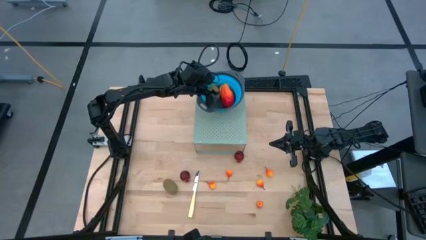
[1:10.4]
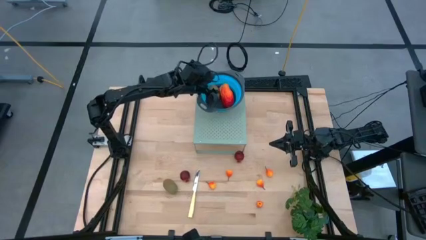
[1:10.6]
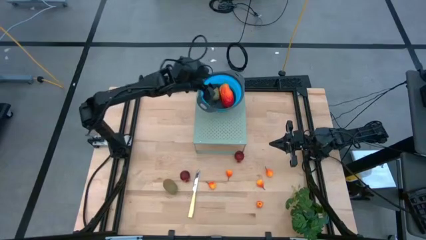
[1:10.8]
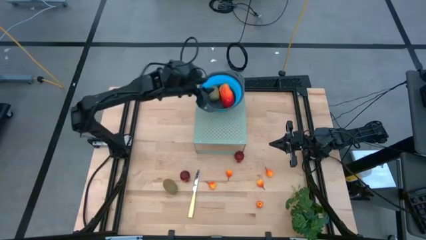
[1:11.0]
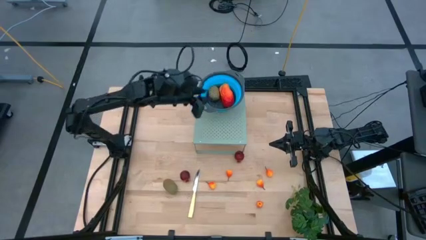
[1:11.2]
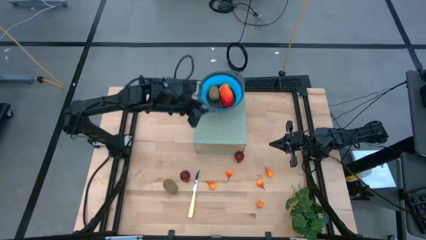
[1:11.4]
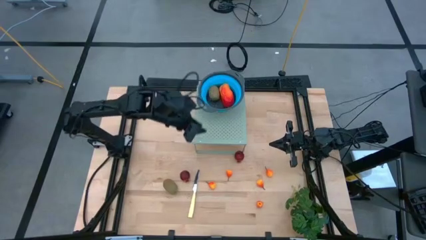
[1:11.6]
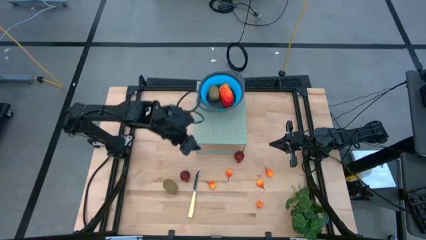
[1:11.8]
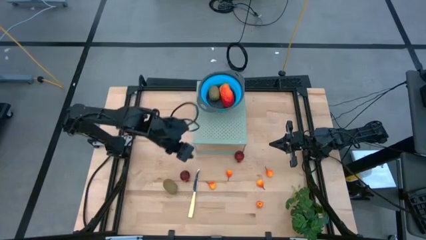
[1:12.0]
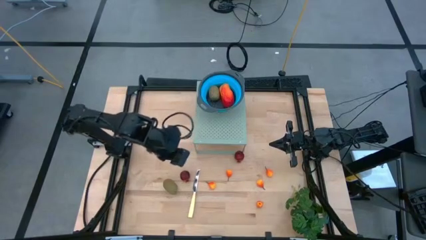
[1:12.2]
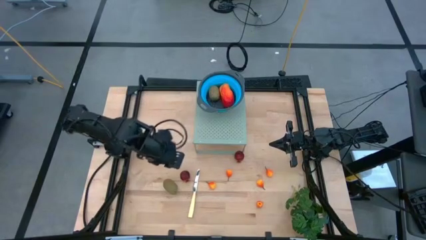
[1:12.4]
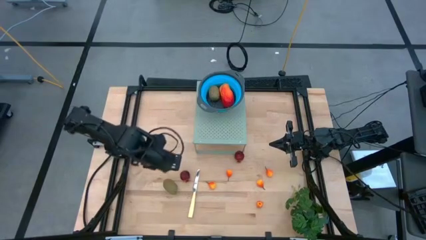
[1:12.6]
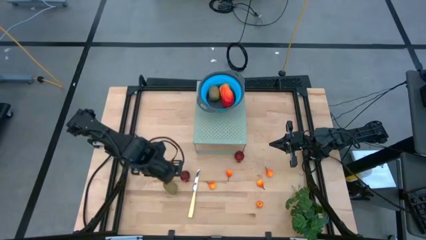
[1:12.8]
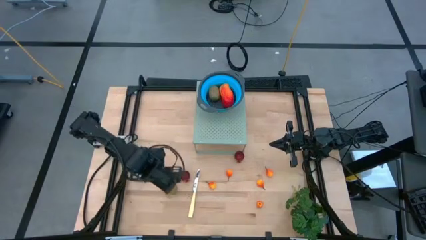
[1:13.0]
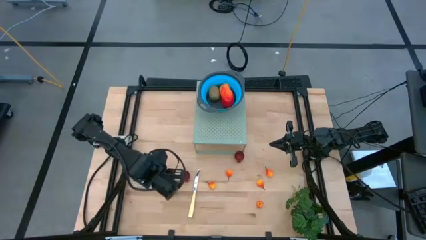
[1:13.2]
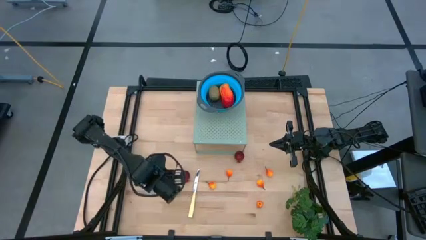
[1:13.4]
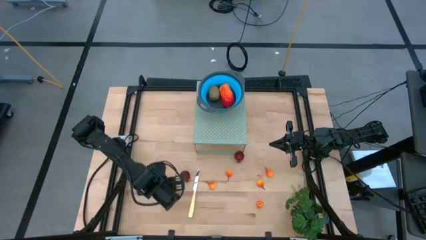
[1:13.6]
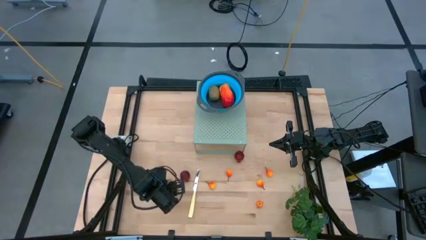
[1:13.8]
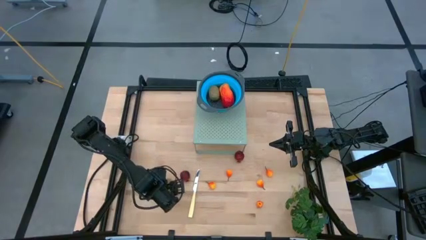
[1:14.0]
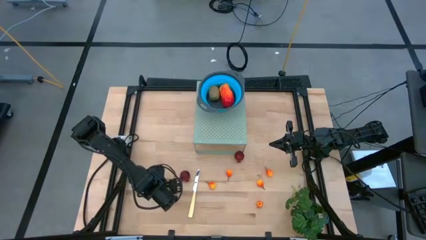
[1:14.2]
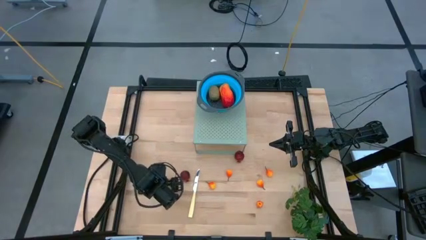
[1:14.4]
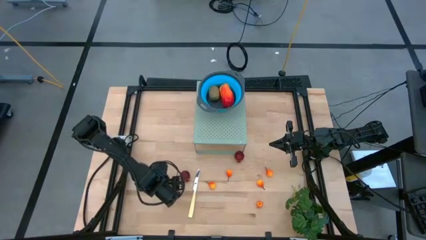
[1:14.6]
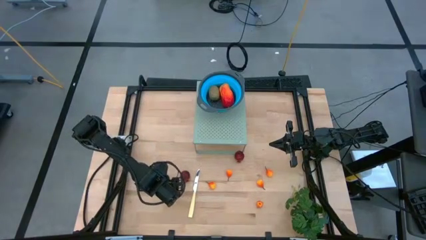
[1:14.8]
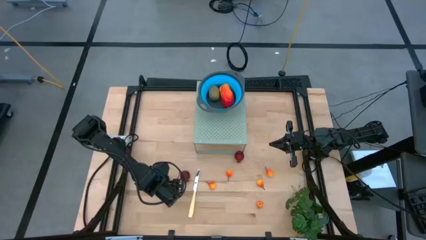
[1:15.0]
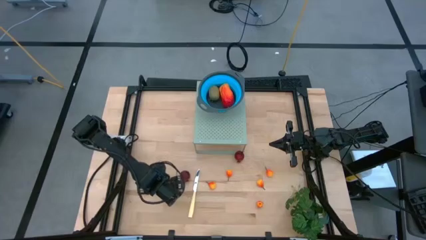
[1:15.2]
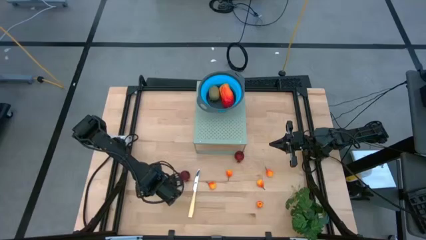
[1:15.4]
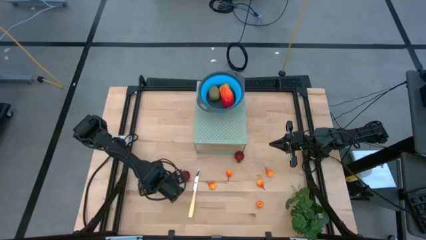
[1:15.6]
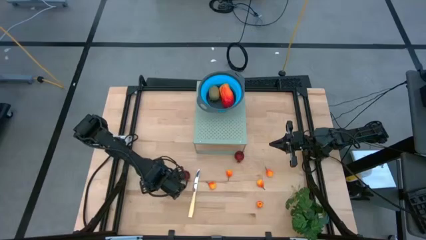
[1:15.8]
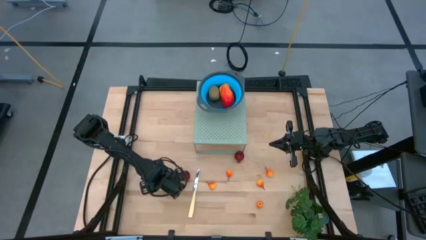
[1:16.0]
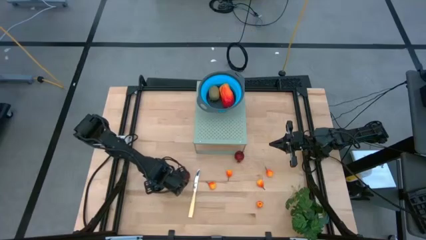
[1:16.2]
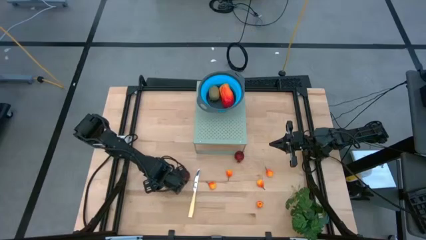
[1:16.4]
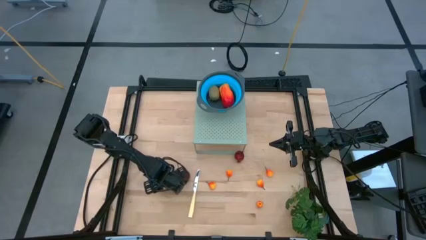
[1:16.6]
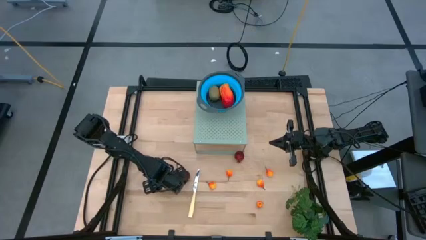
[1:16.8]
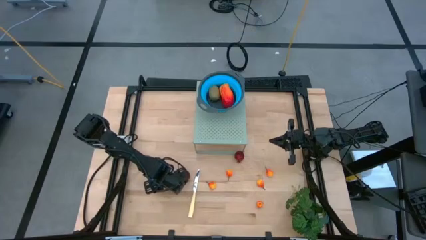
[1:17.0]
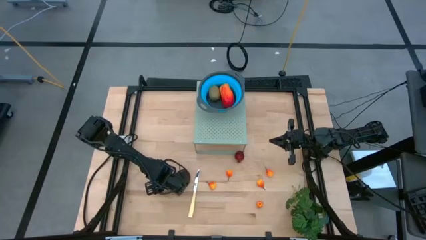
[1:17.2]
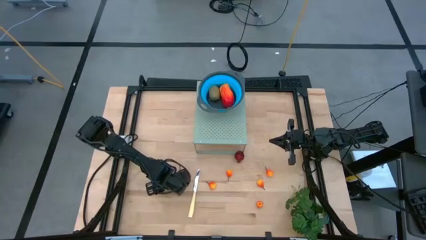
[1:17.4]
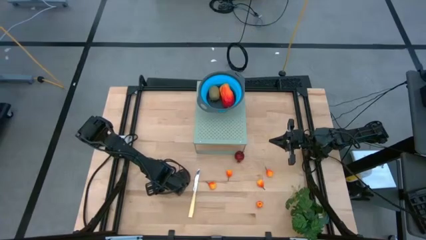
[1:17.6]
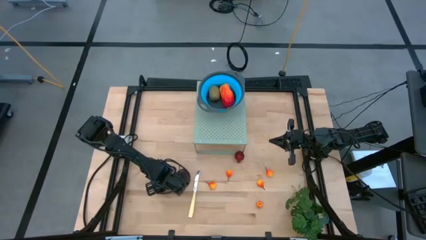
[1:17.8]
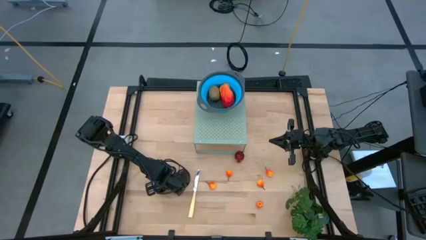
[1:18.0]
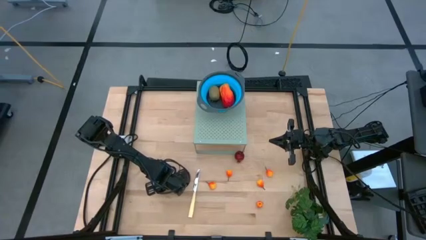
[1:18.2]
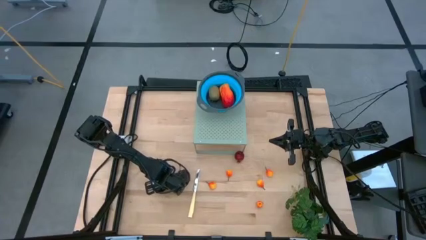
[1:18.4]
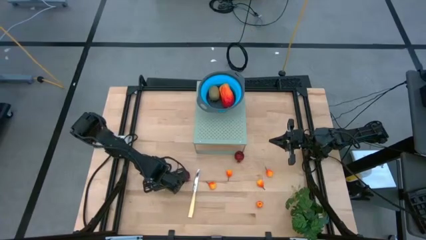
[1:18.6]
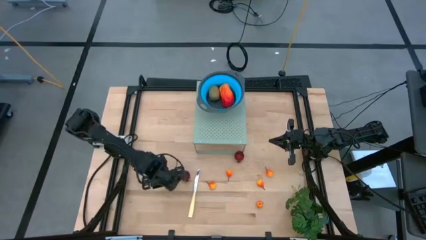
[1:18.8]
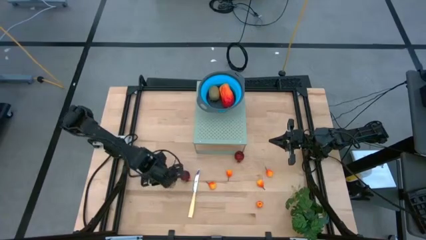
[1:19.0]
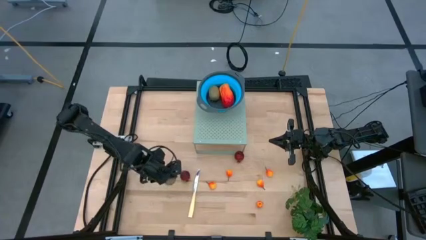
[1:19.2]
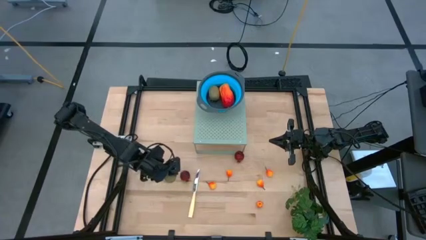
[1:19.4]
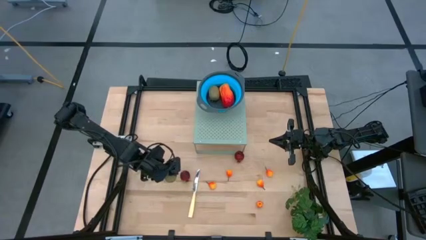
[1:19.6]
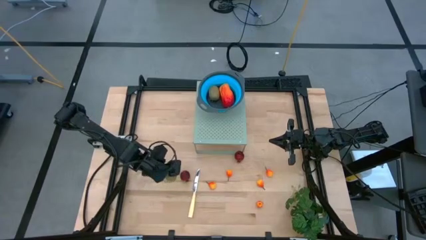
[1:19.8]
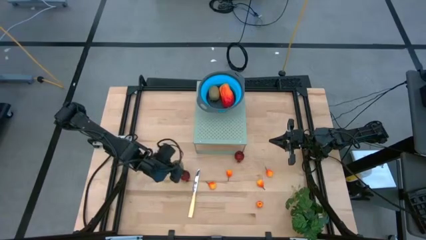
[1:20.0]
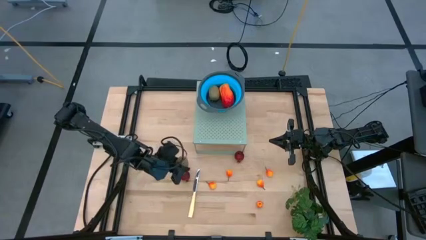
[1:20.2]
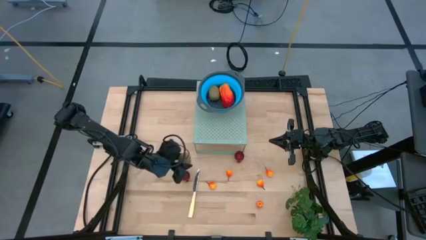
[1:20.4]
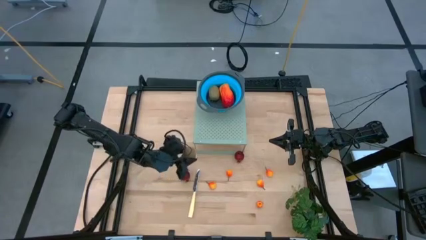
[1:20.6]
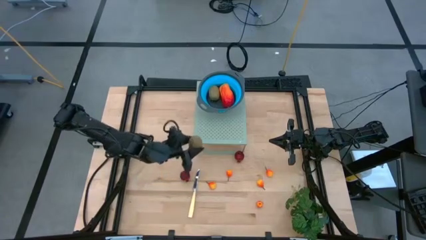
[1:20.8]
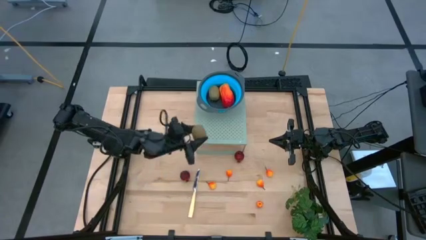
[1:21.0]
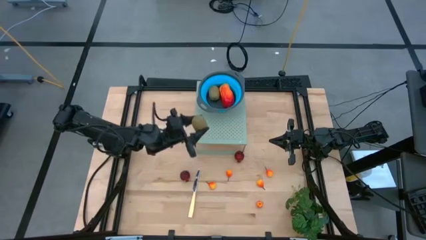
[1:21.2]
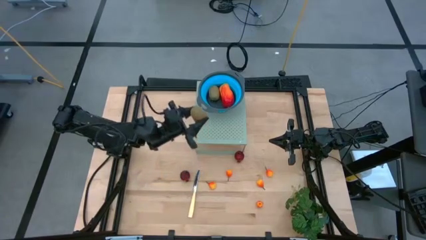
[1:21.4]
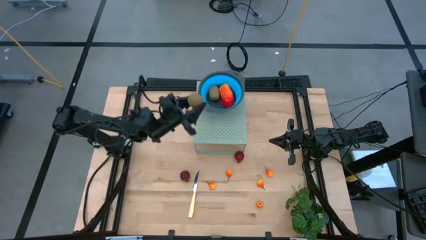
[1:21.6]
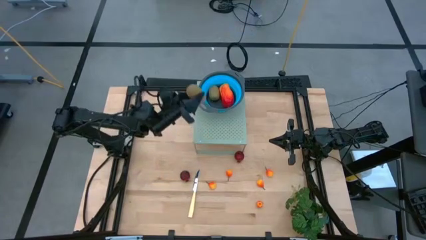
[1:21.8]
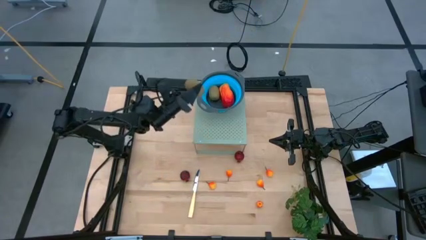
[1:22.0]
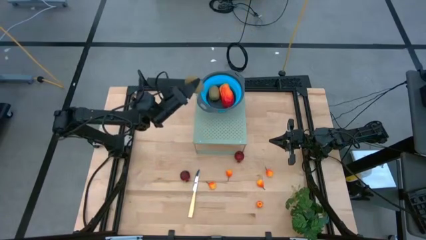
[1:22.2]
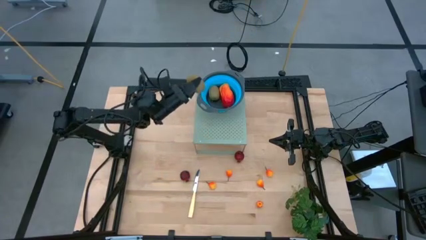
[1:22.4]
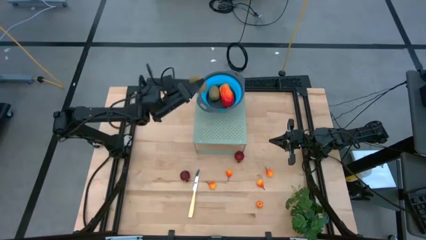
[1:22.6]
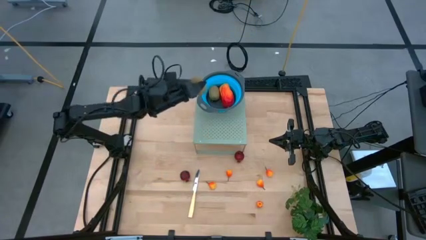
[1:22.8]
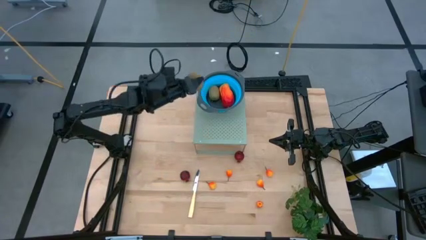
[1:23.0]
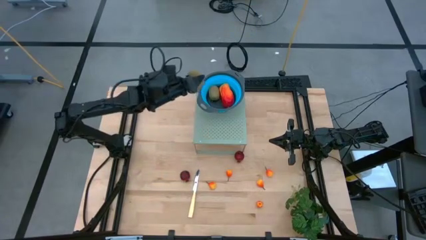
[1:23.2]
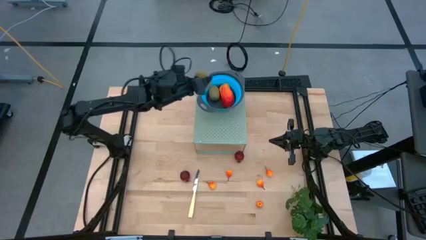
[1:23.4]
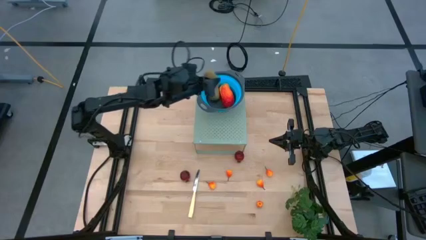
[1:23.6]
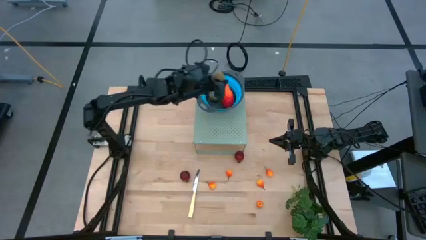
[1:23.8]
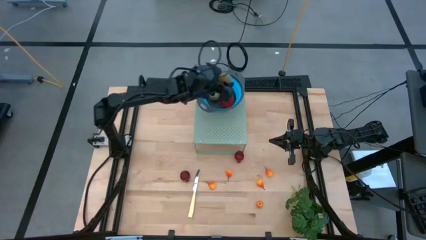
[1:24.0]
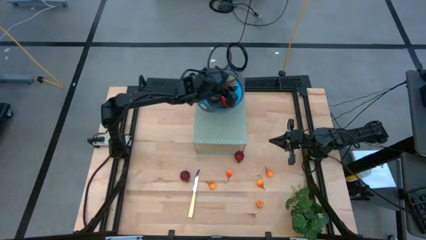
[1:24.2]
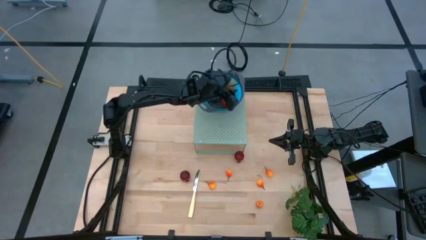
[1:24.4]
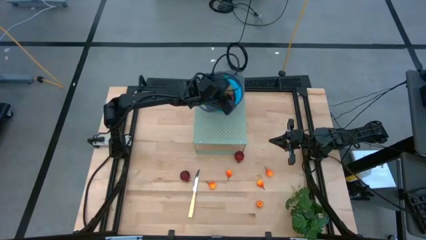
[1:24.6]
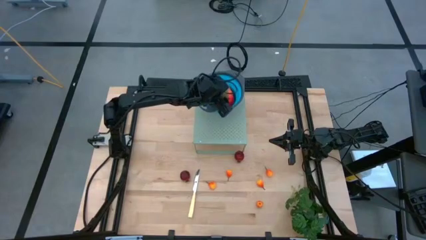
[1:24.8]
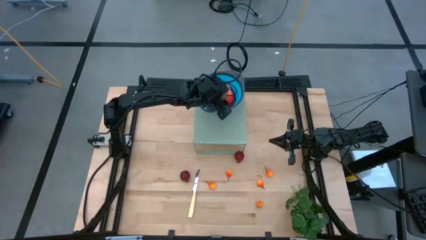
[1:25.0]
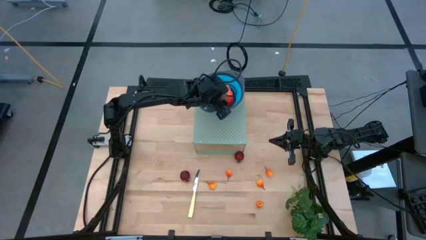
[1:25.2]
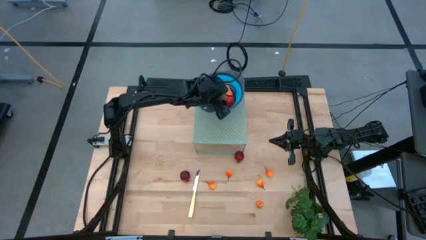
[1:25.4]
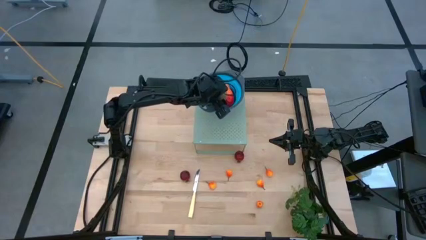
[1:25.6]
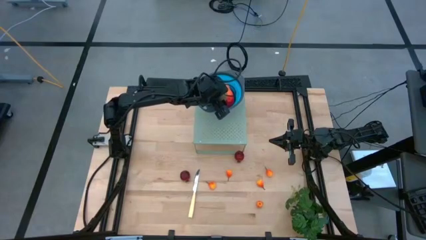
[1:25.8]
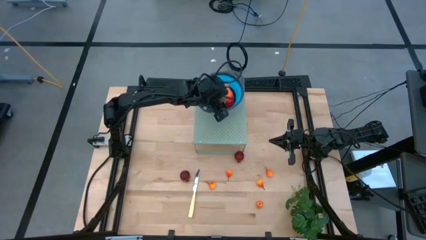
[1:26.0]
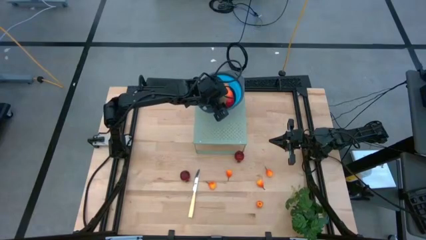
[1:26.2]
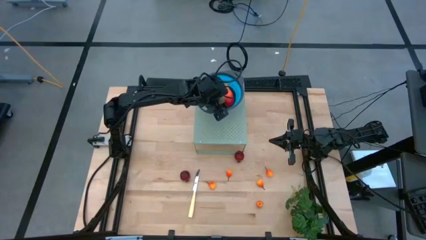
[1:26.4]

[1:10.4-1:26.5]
Task: Pick & Place Fruit
Put the kiwi into the blue strainer bowl on the shelf
